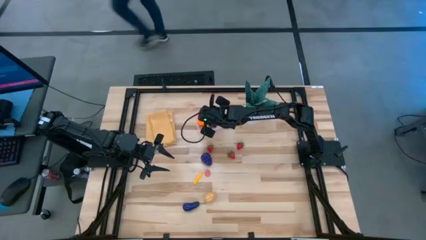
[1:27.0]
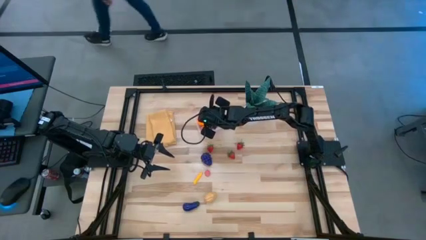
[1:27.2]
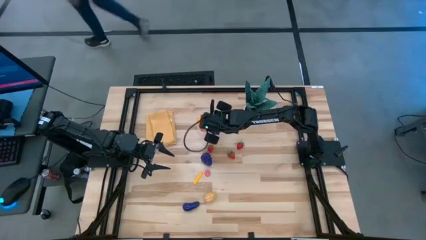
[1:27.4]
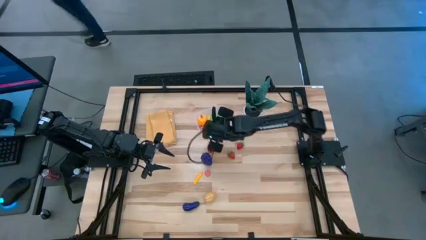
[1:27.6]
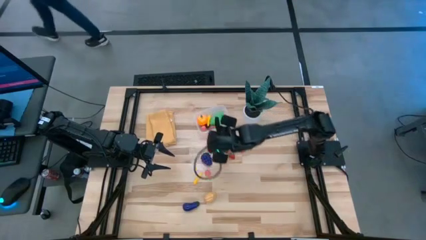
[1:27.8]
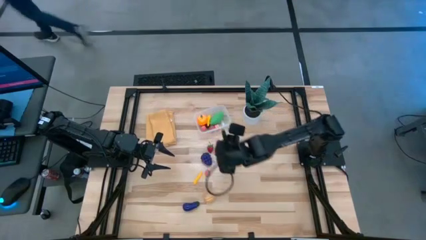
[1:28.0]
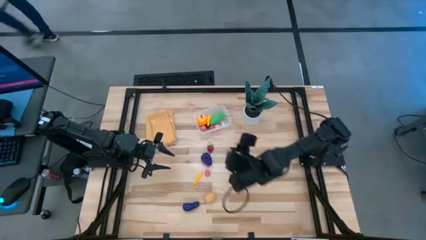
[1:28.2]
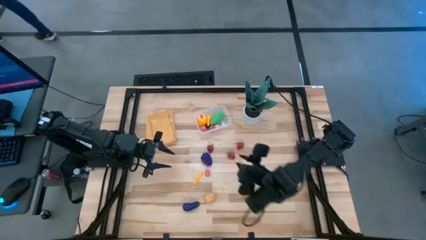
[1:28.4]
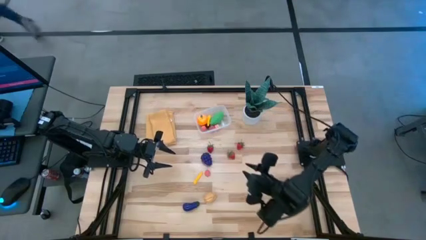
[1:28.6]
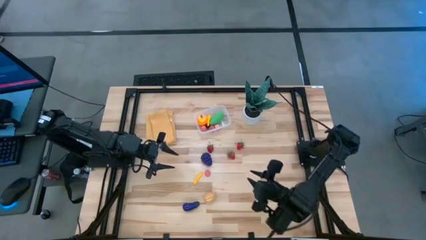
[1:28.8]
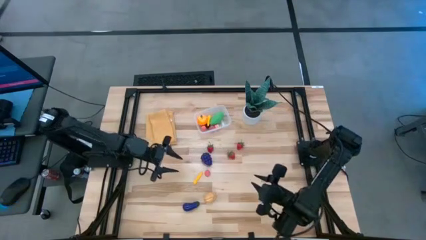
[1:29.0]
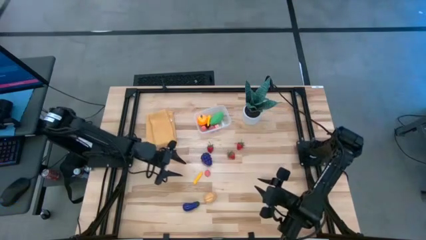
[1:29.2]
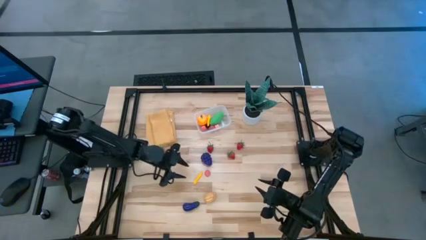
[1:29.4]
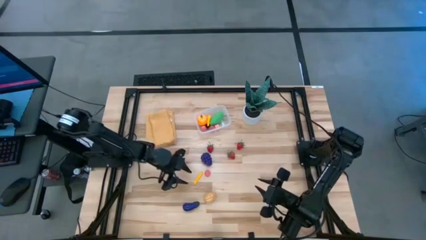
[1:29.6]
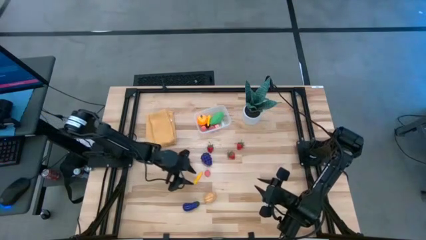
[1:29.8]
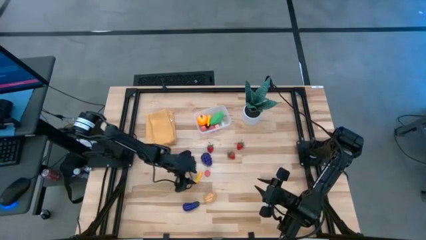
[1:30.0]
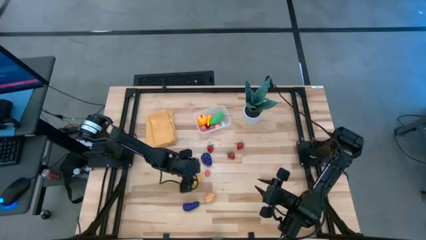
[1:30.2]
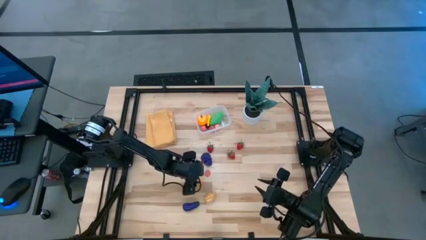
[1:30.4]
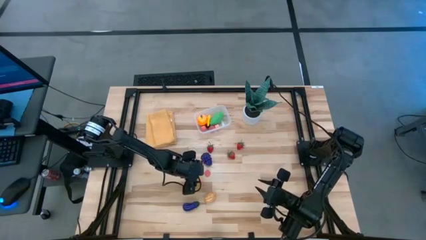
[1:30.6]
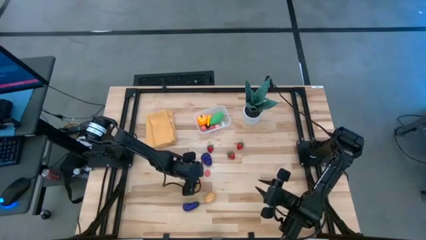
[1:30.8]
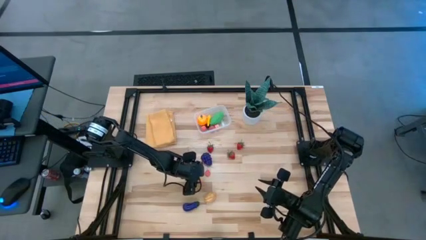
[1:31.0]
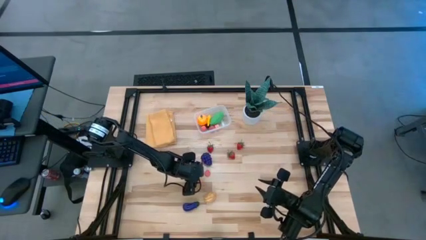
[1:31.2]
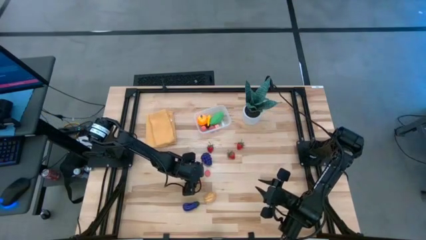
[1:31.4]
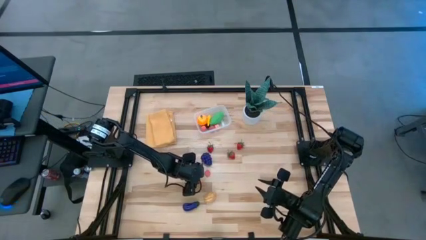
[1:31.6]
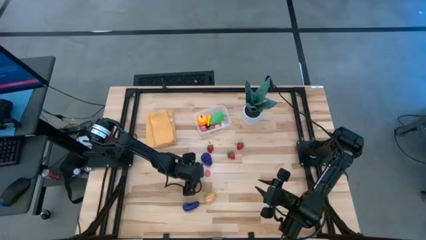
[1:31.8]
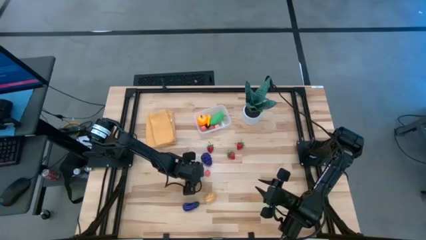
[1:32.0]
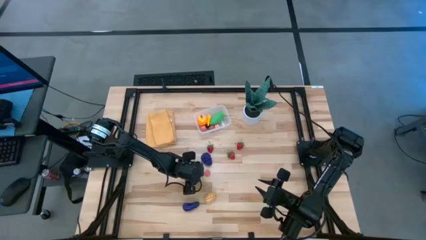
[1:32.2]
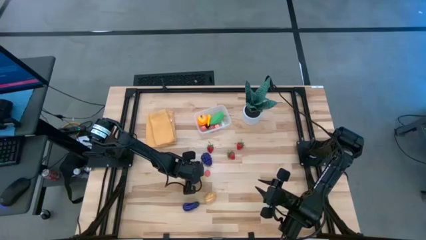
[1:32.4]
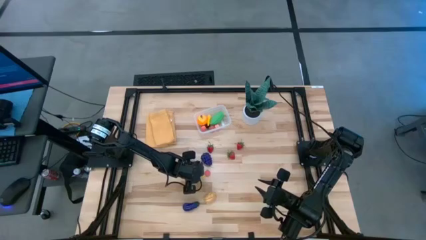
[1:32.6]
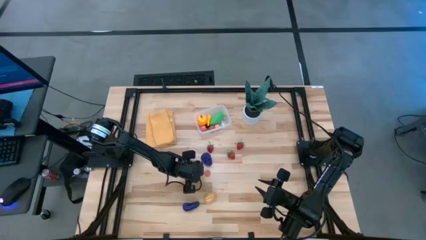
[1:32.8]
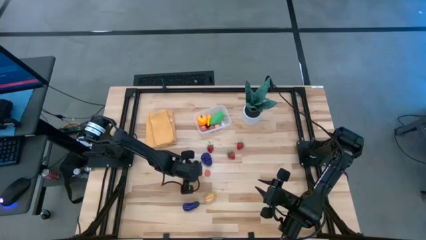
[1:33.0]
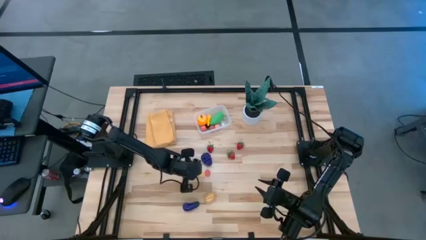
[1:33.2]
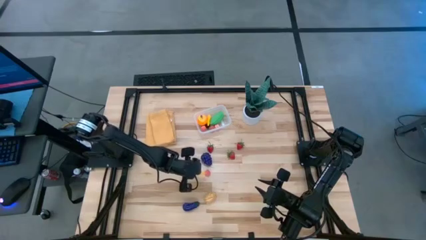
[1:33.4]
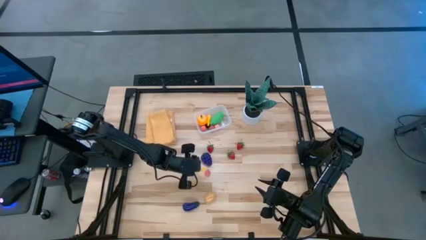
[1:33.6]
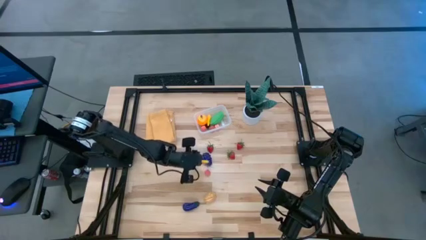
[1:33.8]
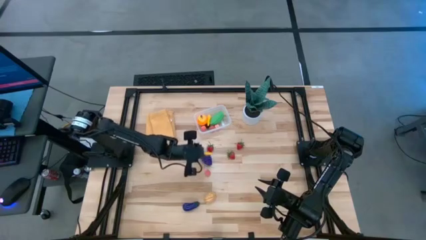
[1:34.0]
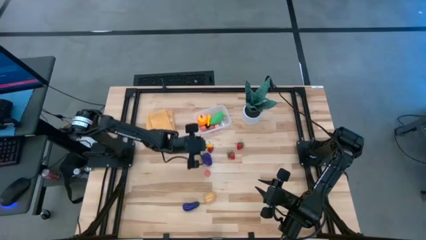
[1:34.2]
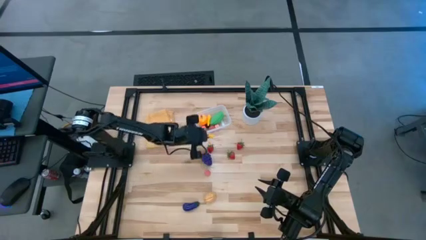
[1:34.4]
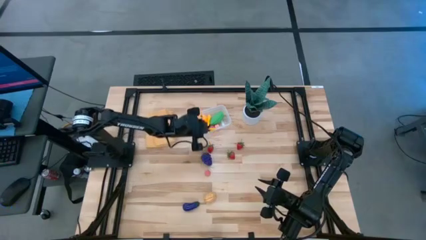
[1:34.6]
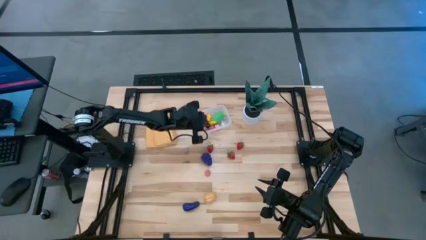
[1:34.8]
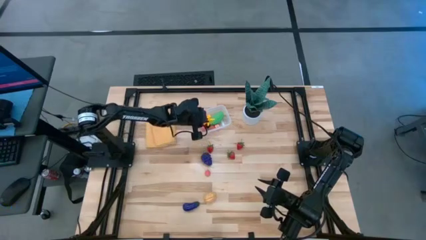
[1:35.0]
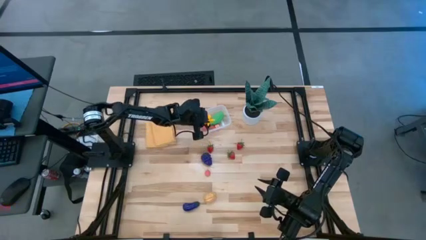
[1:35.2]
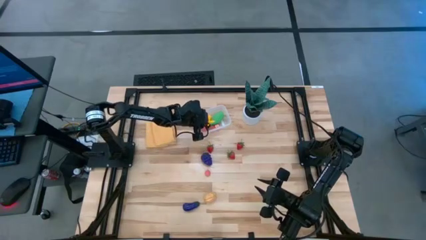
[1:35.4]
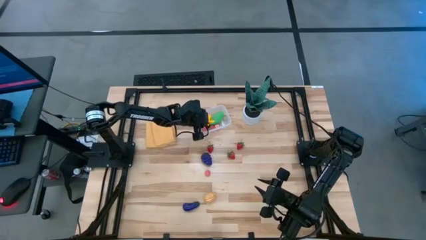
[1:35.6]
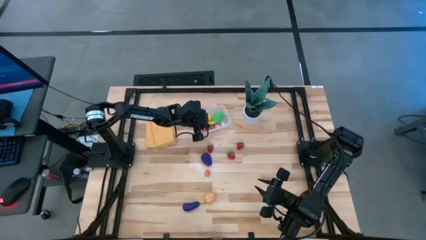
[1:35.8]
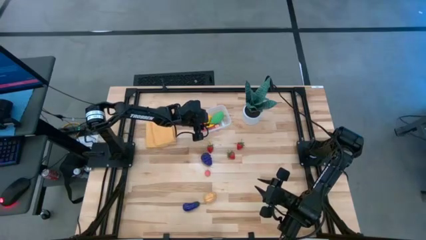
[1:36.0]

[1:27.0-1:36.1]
Task: Pick and placing Produce into tupperware
Put the yellow corn into the transparent bin

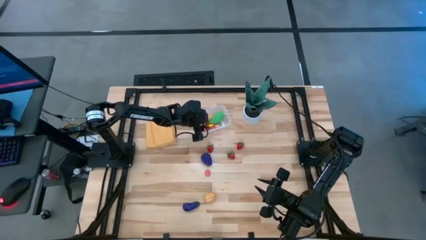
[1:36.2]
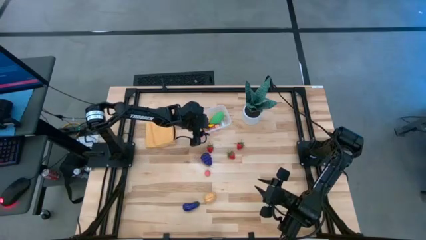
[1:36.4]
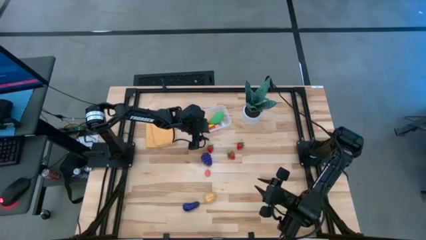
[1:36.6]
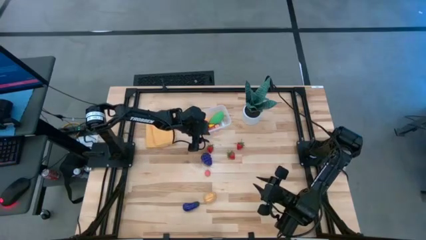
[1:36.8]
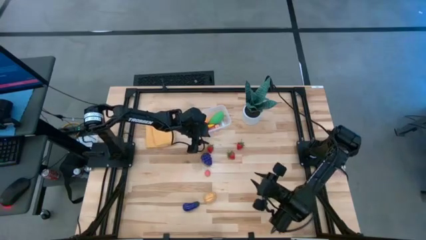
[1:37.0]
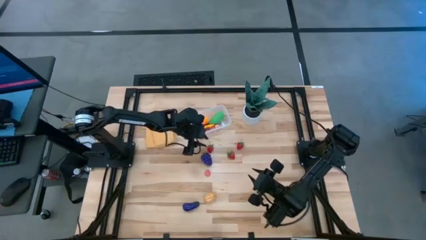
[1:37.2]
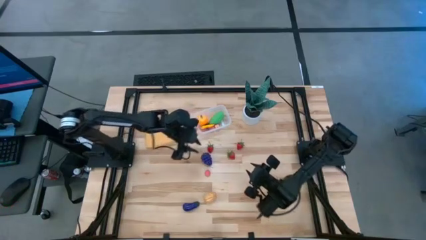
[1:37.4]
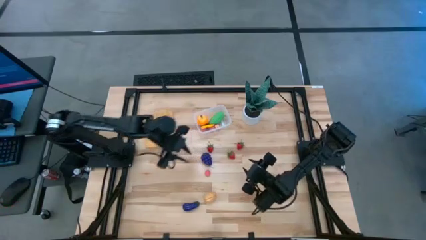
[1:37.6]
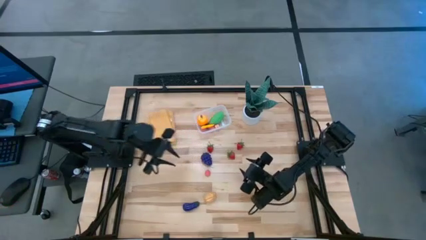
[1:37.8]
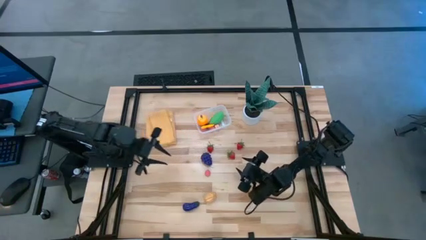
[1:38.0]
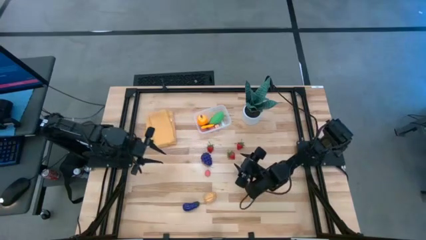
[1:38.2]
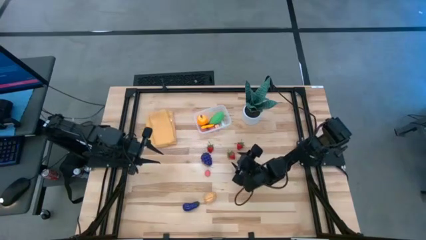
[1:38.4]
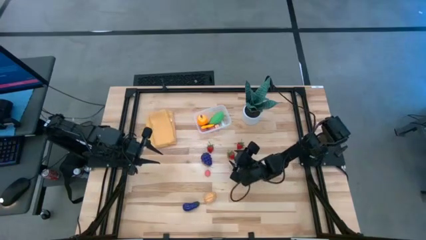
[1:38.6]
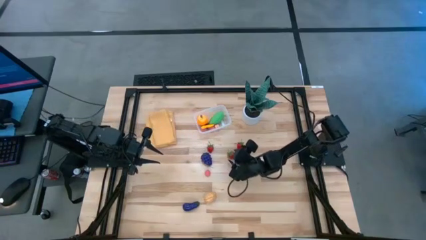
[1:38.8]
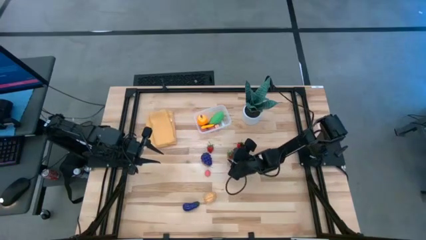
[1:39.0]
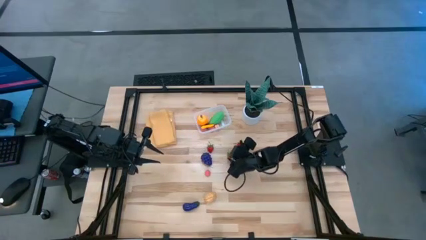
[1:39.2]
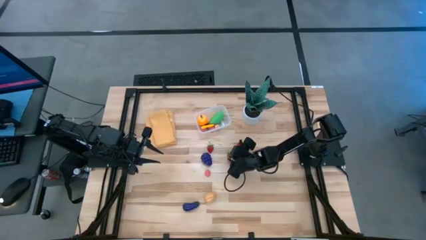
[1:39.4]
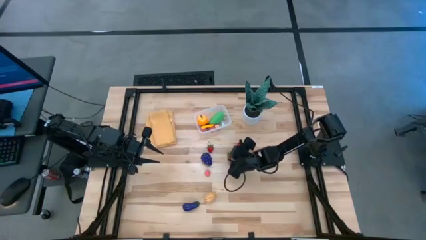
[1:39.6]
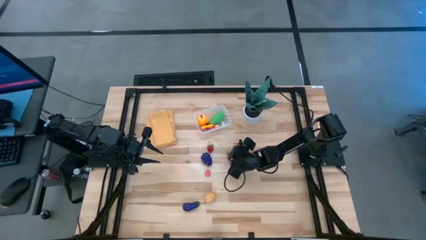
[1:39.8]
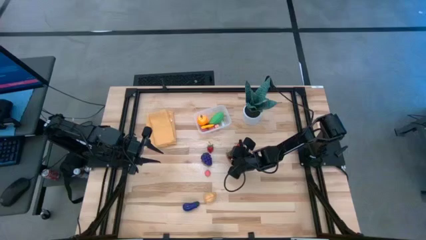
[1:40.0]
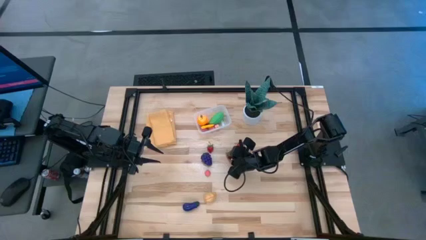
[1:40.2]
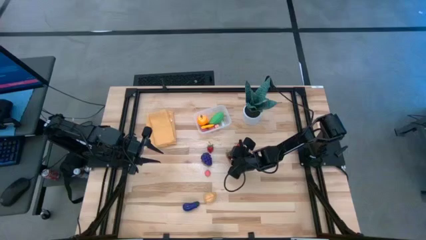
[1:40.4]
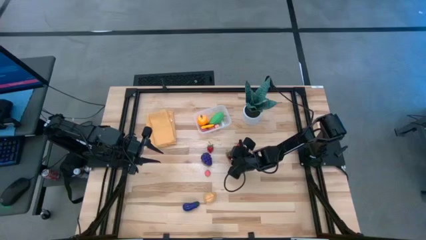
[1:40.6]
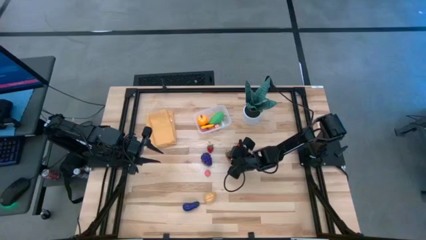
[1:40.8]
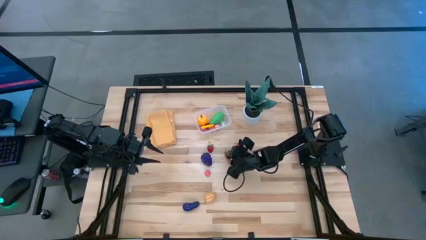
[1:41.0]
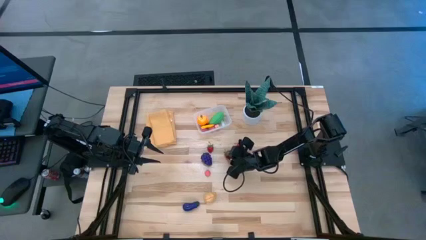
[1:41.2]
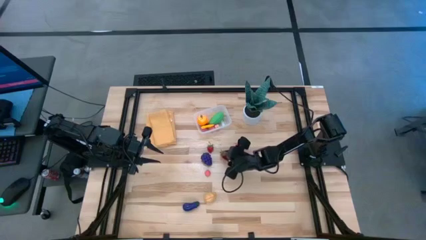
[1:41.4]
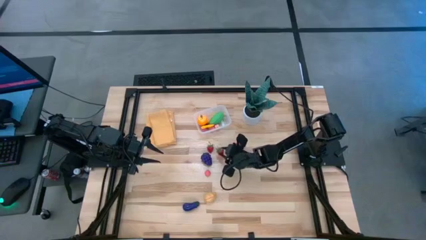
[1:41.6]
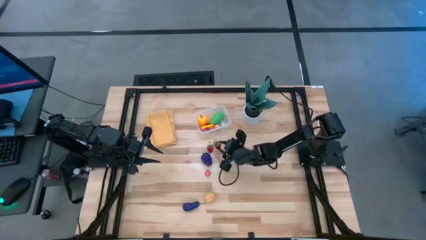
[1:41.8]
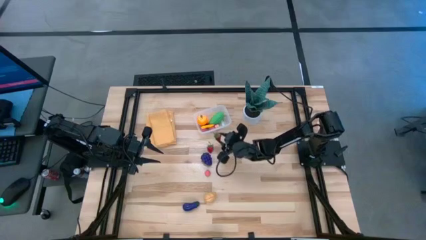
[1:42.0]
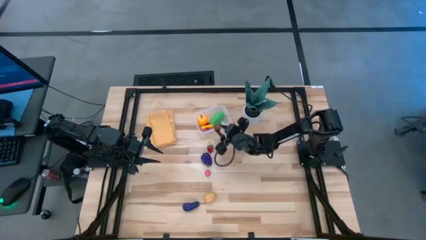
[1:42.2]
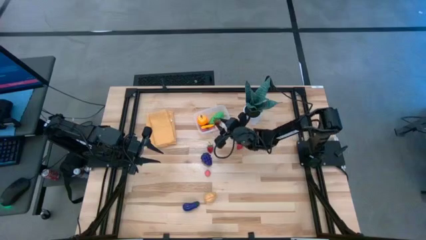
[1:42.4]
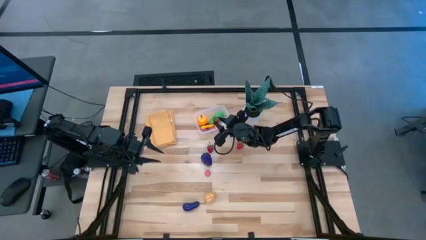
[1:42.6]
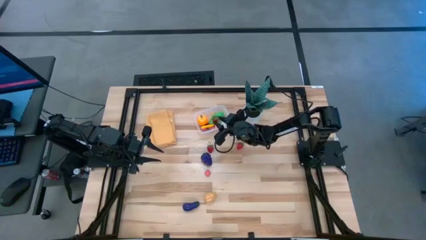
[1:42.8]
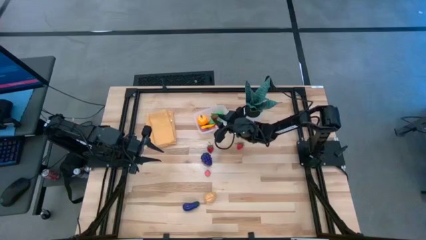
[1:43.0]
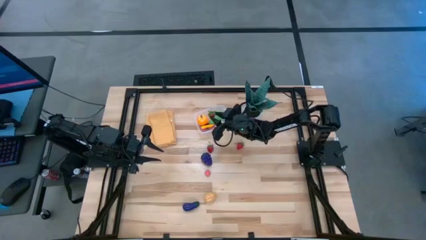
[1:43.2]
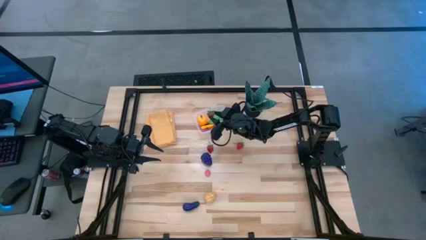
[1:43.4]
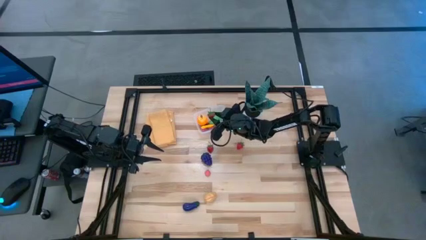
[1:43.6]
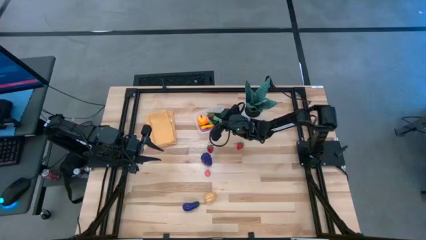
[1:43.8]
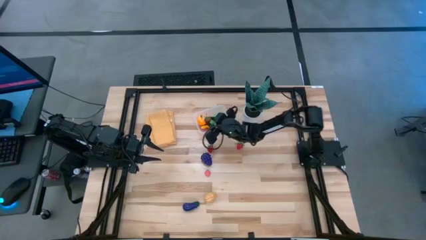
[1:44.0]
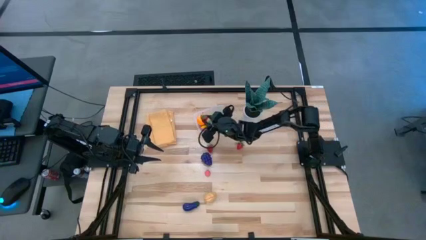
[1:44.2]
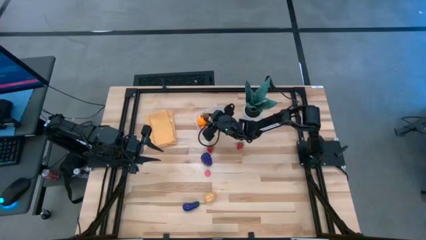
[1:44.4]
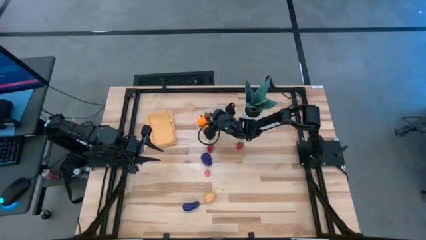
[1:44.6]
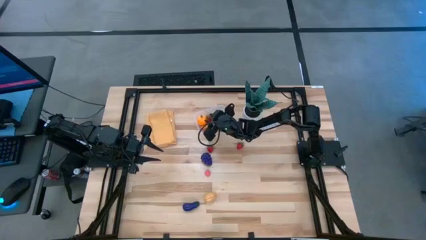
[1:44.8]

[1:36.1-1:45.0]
Put the middle strawberry into the transparent bin
